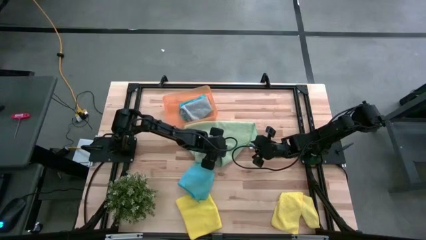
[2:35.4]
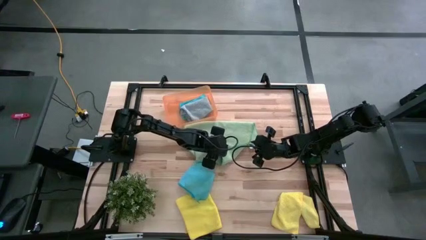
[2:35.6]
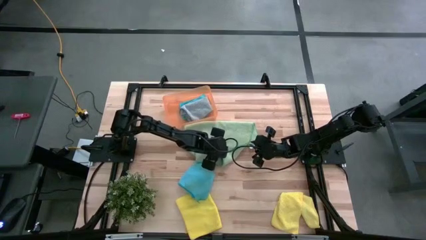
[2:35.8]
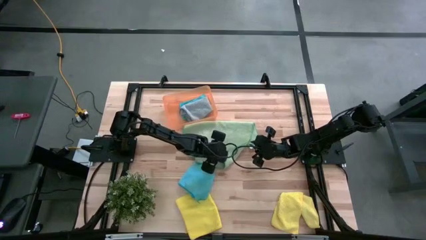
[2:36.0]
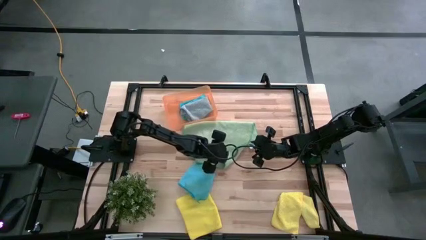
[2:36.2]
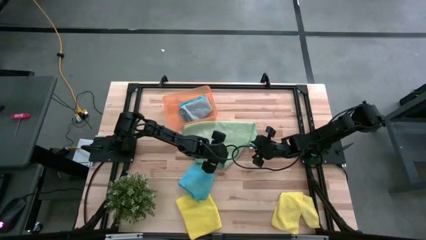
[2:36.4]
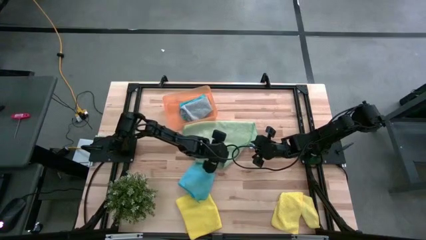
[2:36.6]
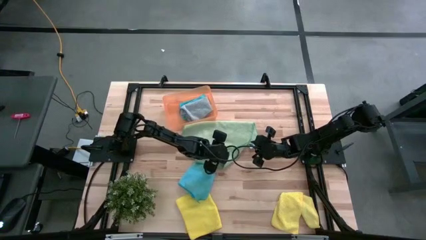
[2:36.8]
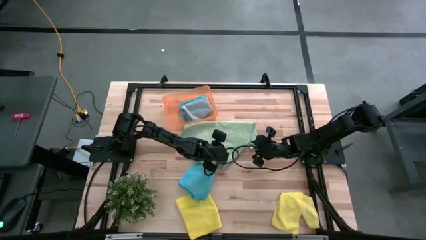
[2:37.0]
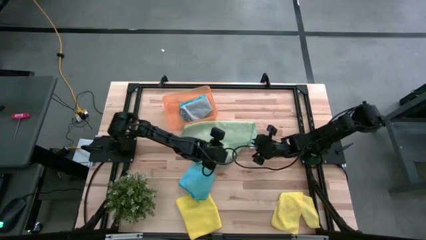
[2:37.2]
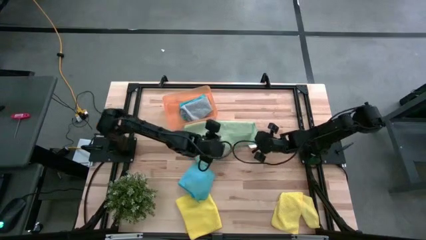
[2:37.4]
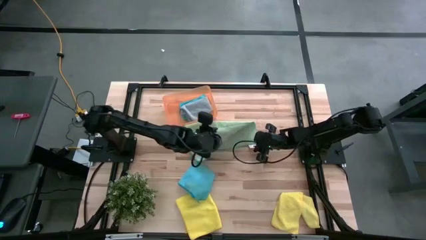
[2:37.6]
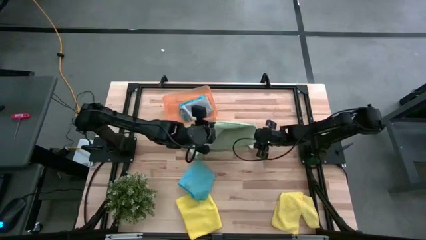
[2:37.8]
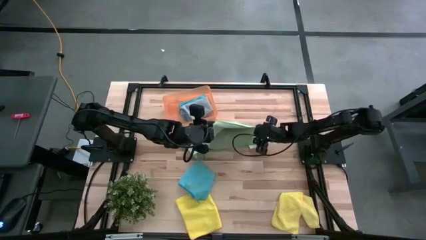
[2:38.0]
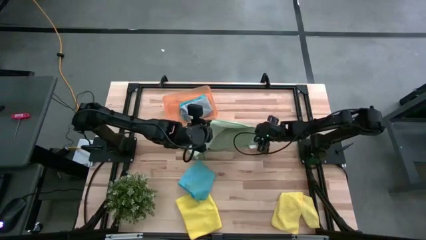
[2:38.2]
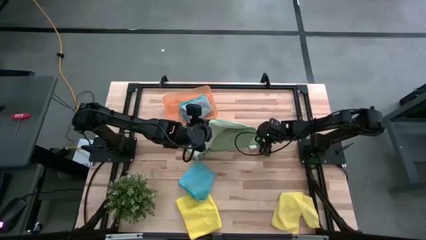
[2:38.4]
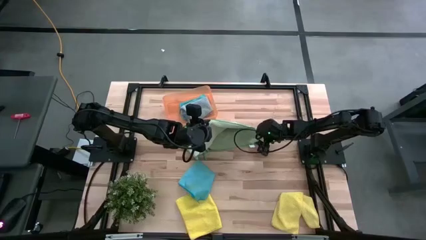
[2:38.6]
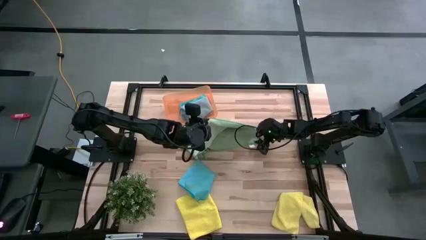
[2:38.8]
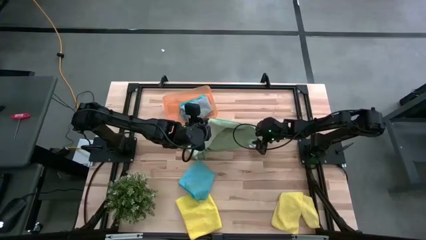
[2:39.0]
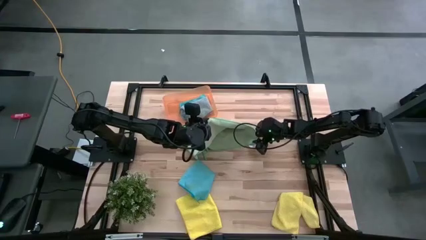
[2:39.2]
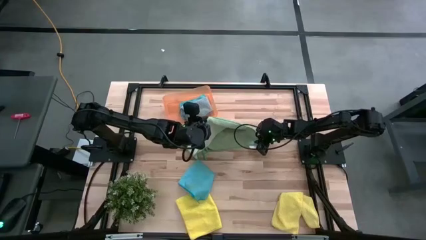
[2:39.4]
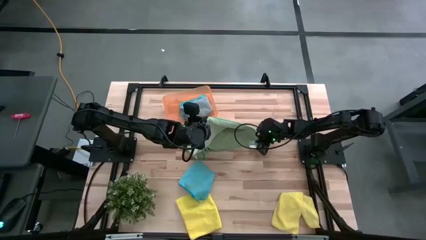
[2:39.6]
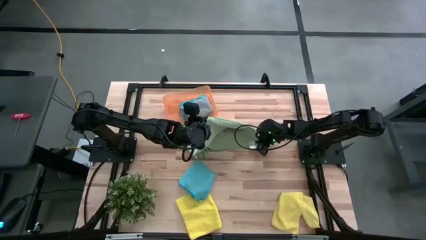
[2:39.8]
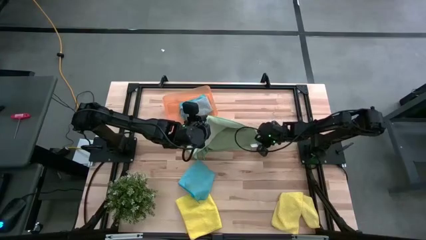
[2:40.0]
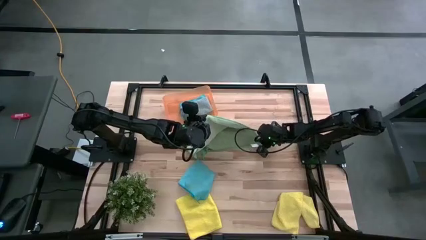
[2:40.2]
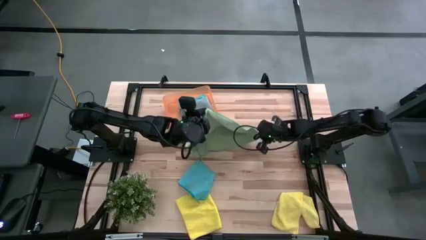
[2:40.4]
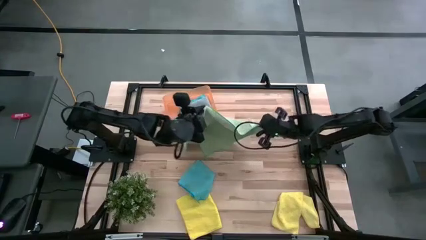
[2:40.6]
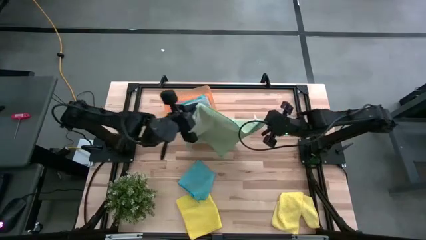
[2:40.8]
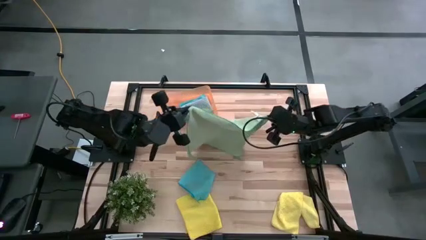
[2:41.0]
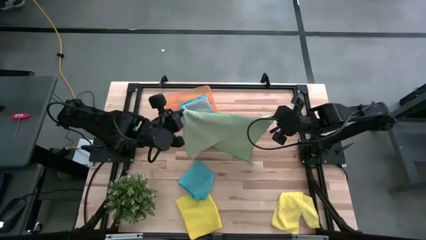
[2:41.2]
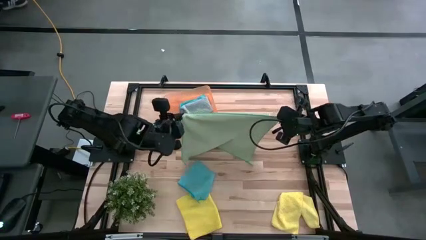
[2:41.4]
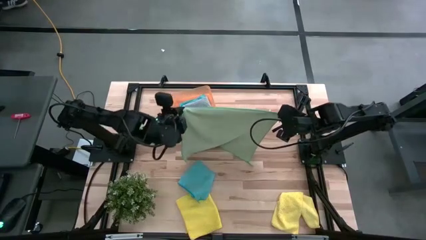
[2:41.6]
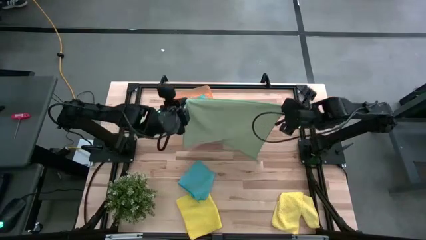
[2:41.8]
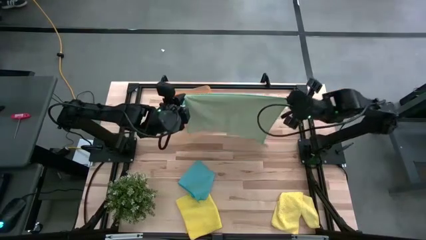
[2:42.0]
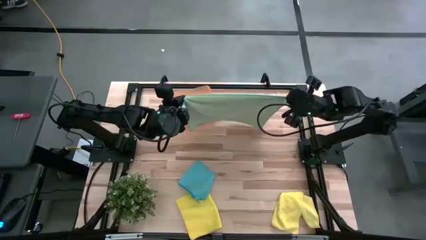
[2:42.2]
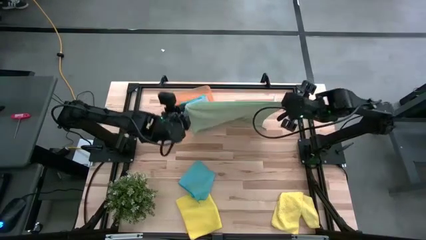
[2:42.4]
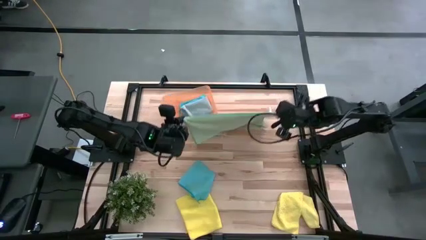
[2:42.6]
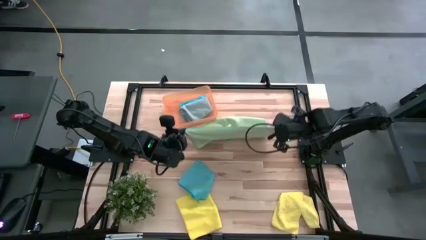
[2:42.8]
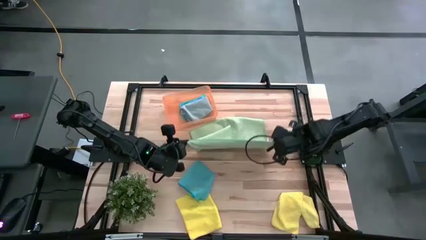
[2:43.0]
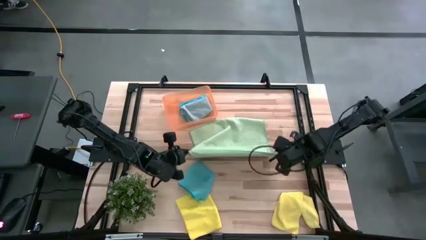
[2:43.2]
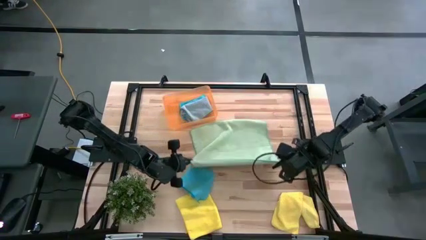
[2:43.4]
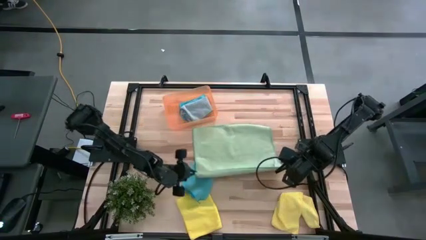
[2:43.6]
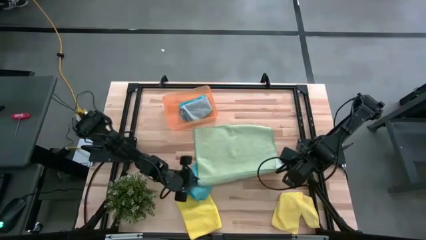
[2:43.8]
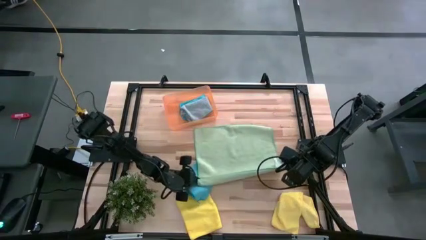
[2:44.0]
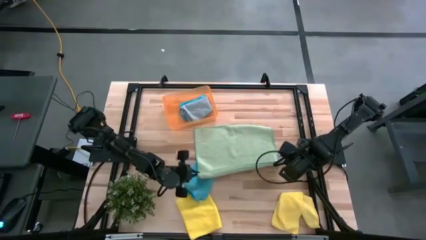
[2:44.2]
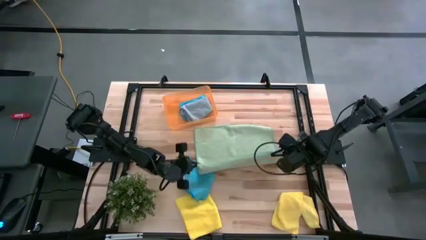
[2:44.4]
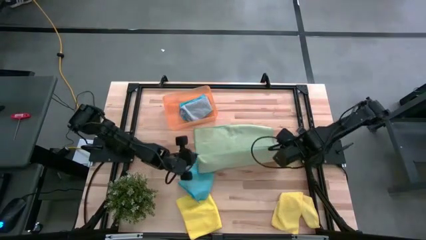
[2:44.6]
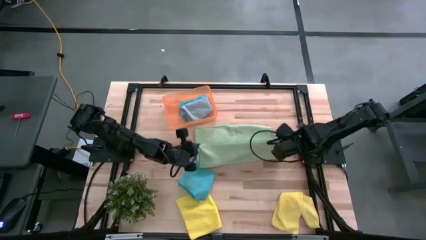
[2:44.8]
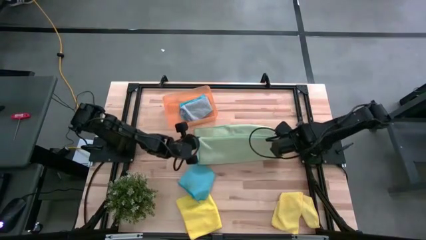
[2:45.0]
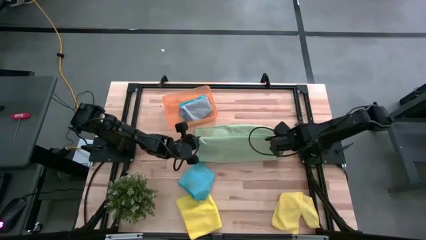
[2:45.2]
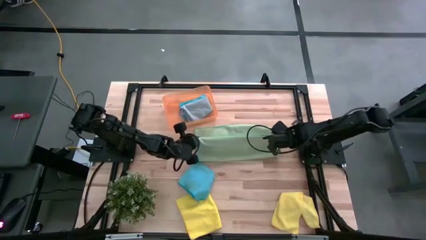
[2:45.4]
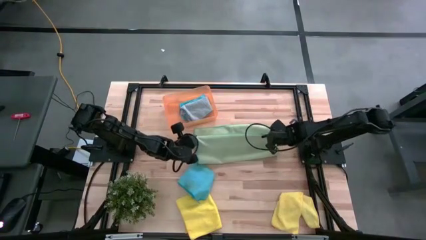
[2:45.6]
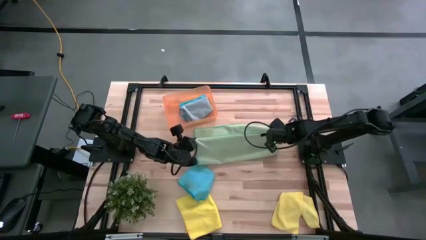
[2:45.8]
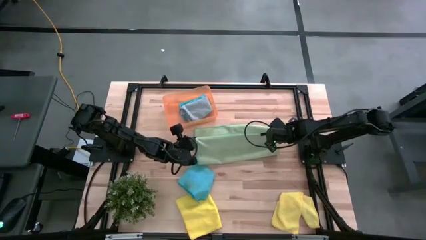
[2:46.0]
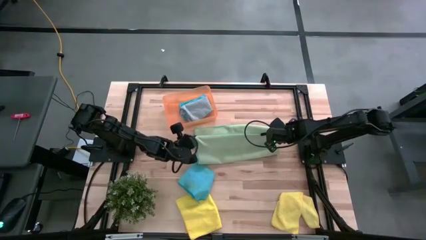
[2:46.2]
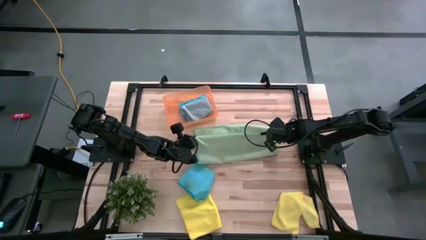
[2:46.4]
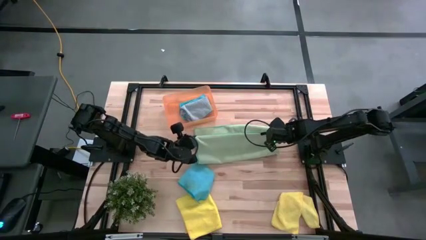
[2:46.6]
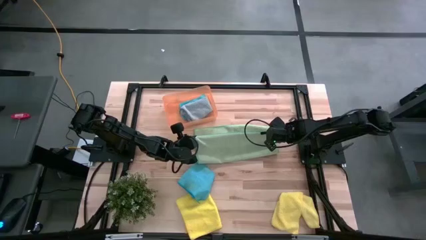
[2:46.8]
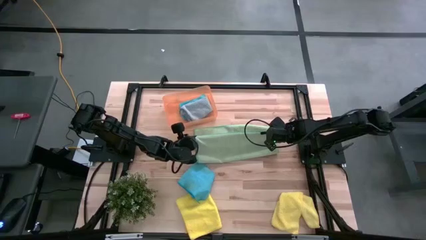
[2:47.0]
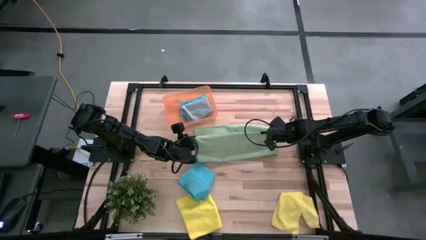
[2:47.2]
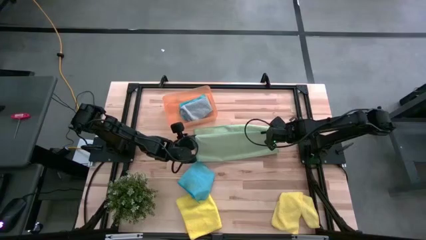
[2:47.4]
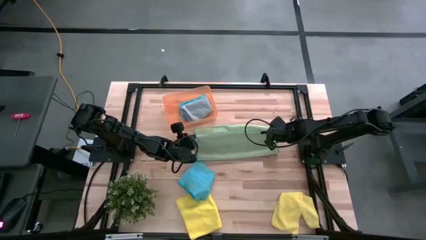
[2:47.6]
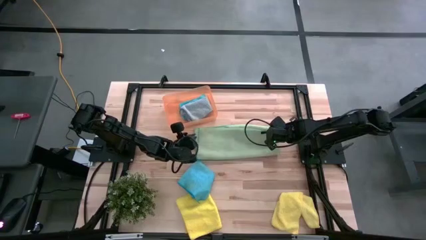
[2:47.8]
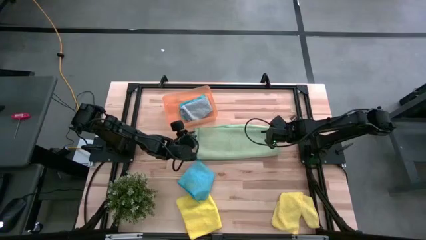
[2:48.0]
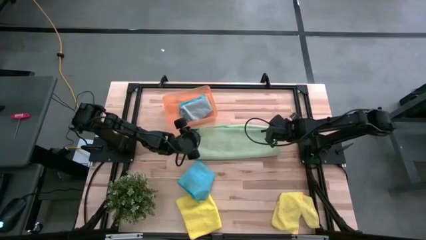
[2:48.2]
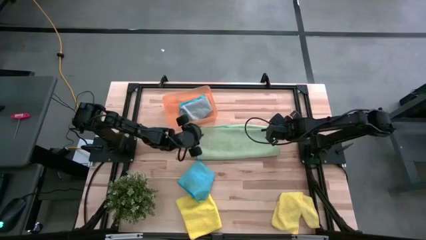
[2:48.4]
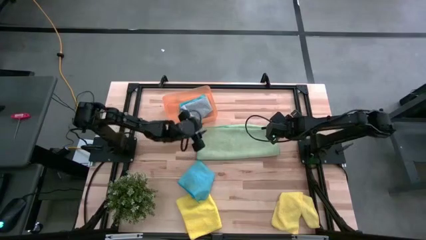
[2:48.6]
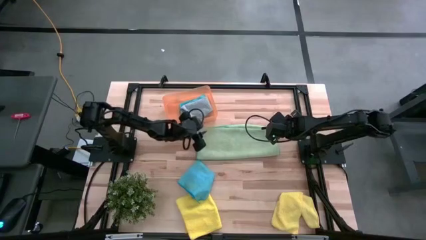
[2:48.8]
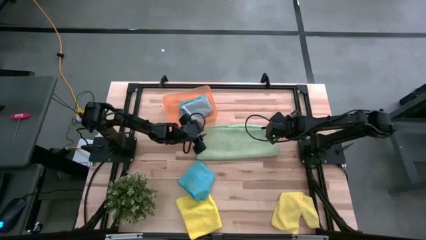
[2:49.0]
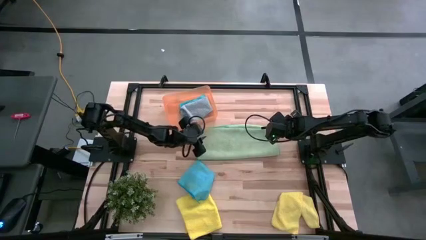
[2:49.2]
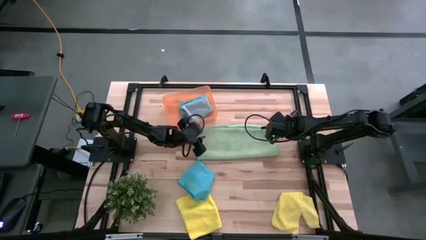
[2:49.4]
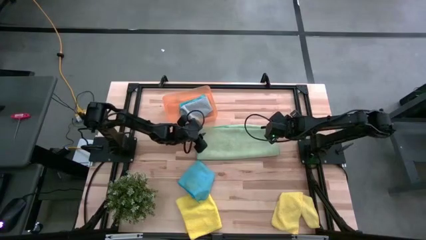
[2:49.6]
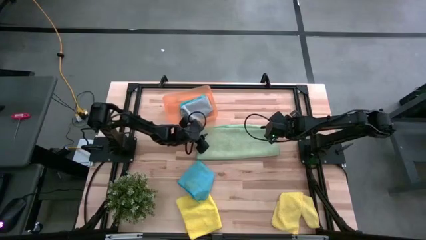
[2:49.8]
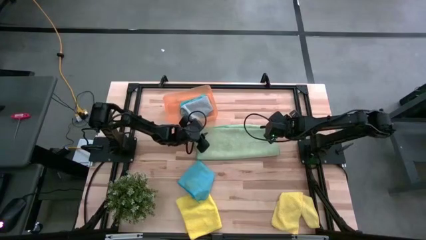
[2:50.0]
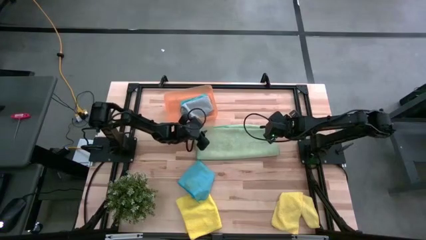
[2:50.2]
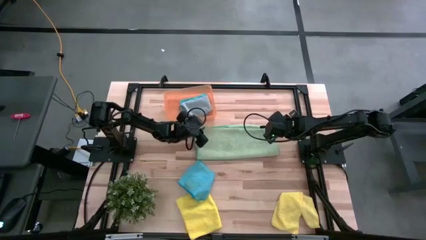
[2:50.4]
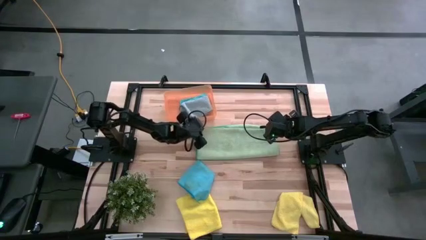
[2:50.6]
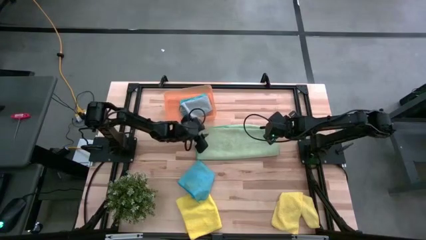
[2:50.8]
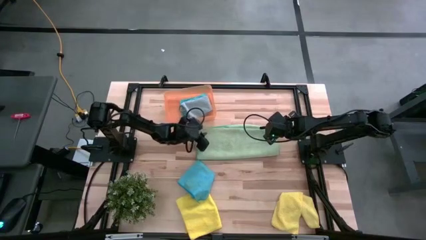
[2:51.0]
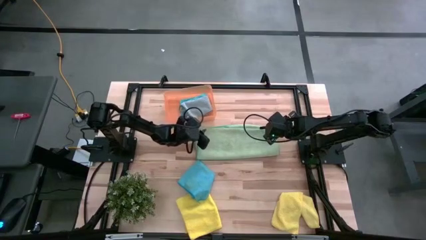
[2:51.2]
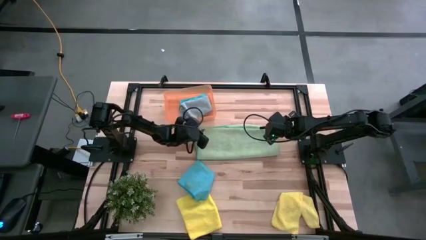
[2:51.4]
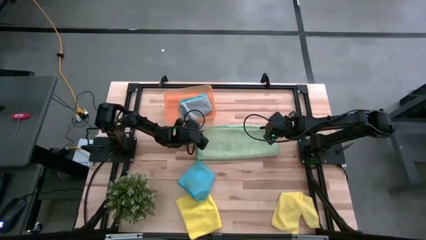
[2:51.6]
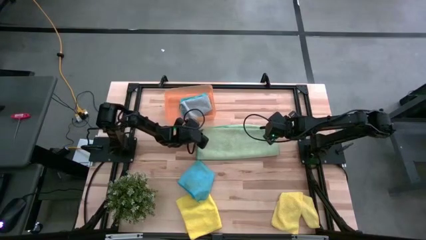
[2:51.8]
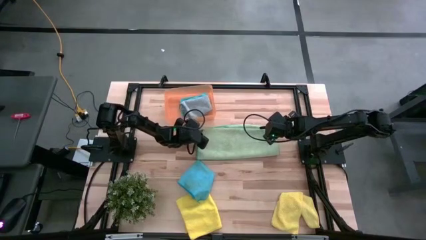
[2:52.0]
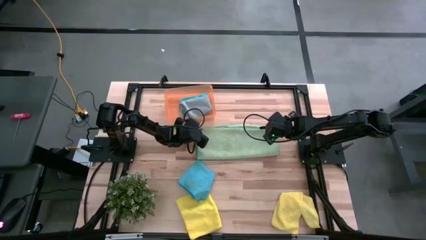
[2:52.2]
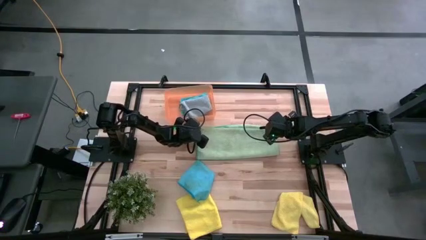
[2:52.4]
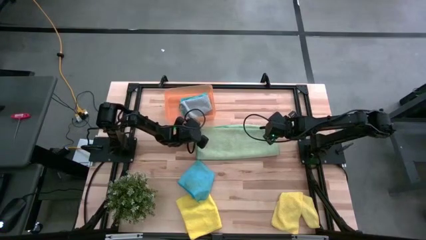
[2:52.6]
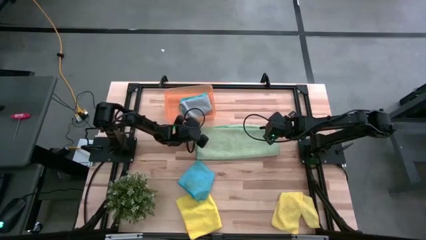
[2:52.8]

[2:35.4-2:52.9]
Task: Fold microfiber towels
Fold the green microfiber cloth
